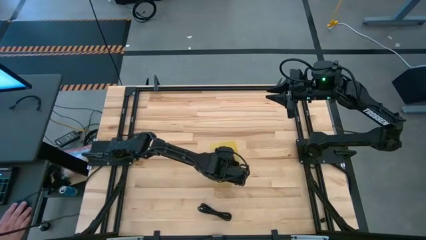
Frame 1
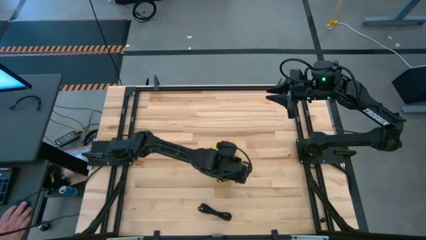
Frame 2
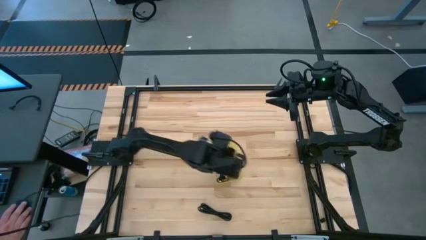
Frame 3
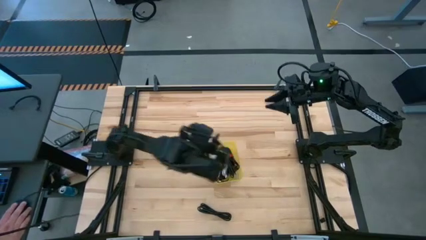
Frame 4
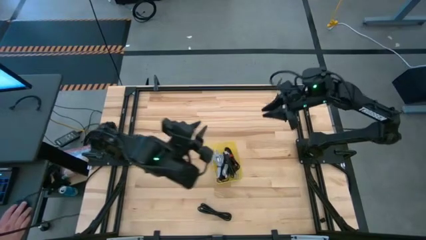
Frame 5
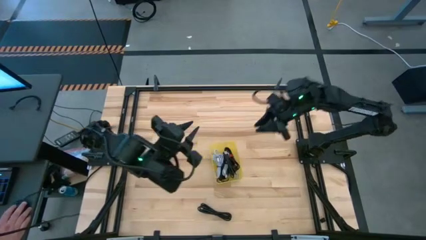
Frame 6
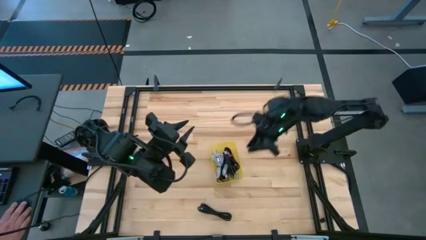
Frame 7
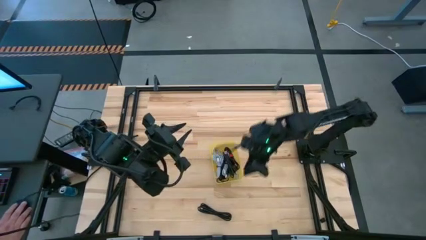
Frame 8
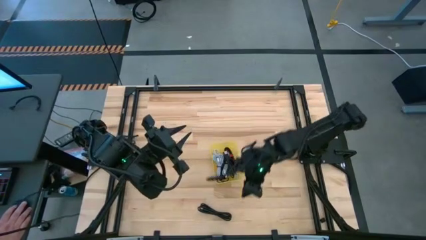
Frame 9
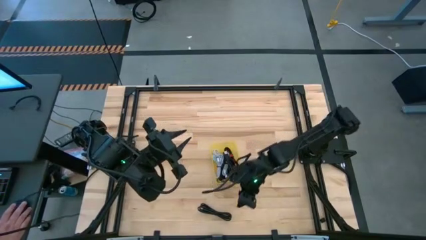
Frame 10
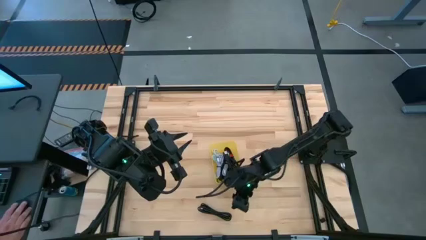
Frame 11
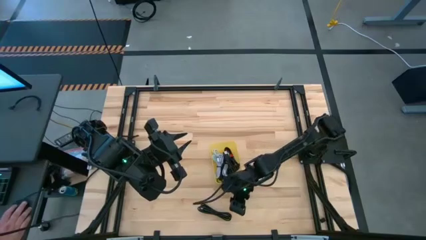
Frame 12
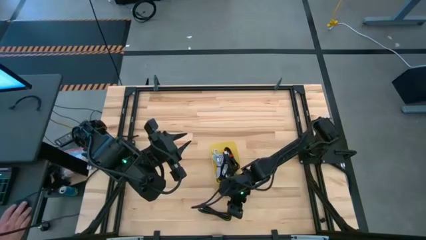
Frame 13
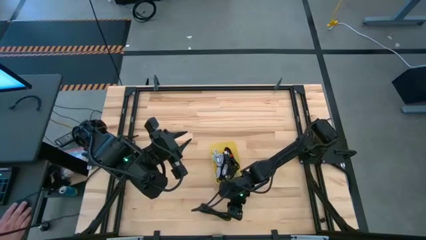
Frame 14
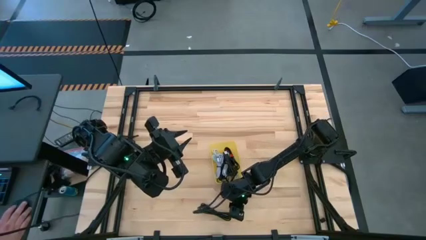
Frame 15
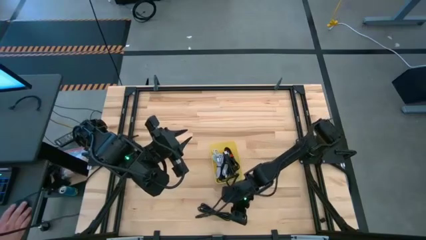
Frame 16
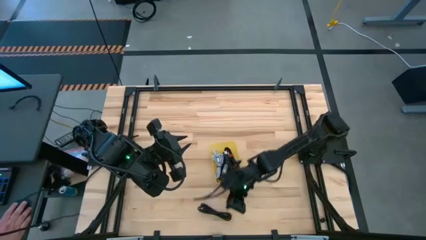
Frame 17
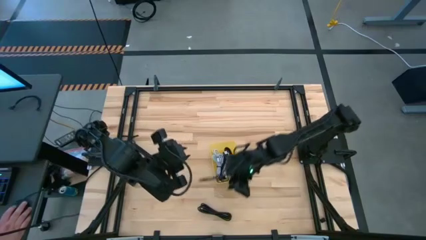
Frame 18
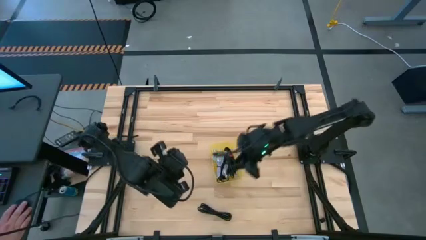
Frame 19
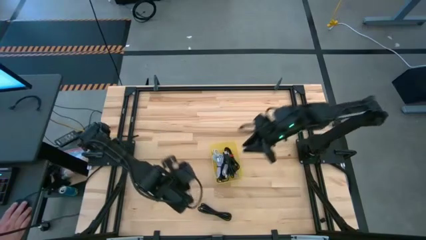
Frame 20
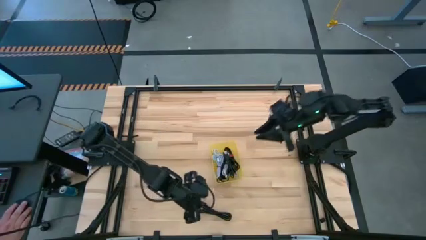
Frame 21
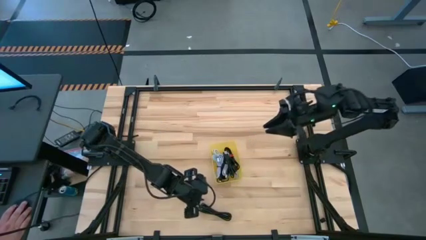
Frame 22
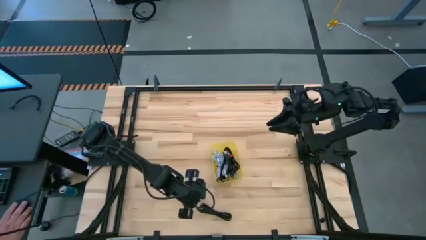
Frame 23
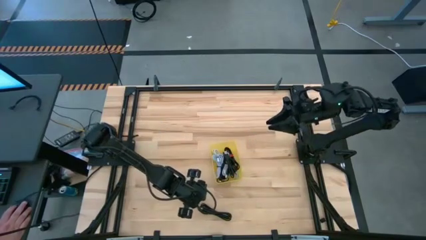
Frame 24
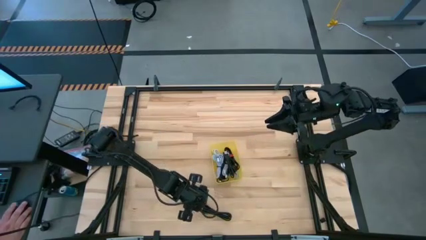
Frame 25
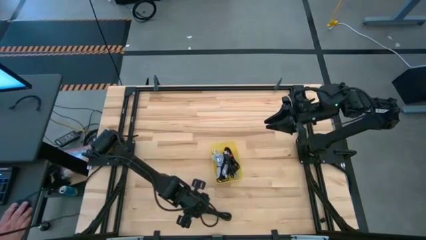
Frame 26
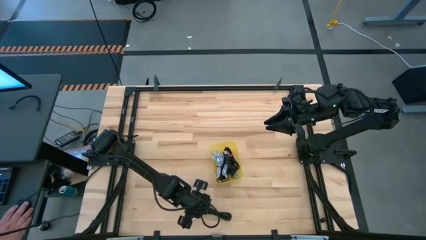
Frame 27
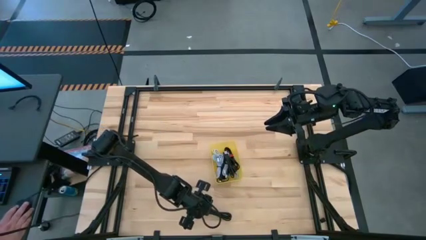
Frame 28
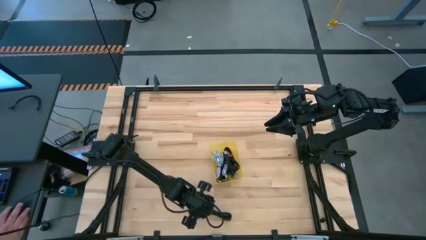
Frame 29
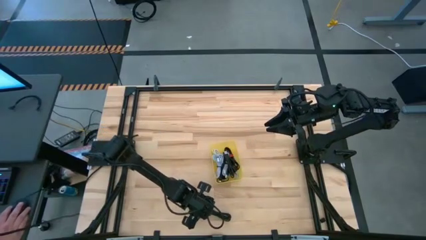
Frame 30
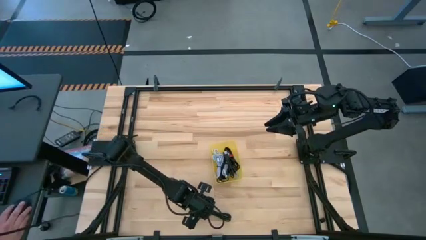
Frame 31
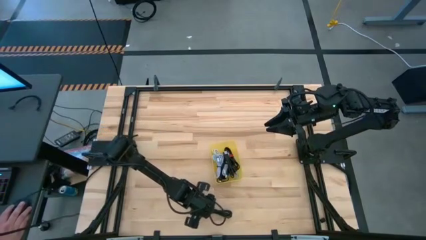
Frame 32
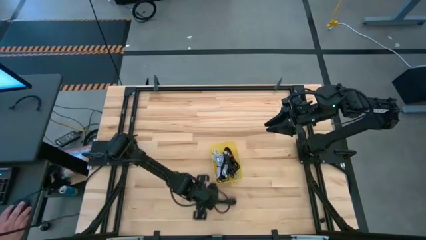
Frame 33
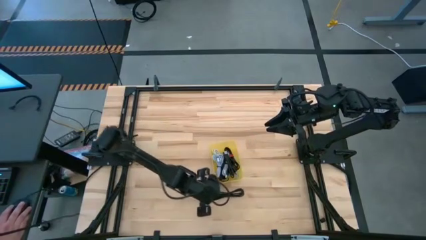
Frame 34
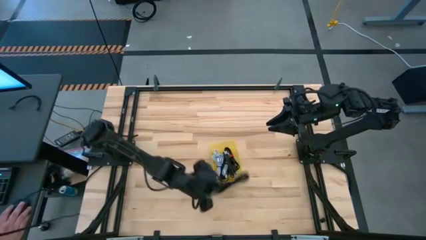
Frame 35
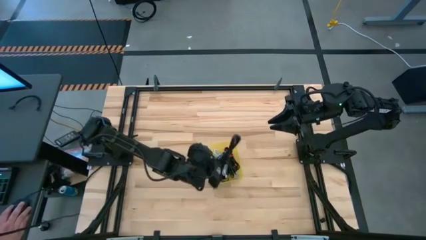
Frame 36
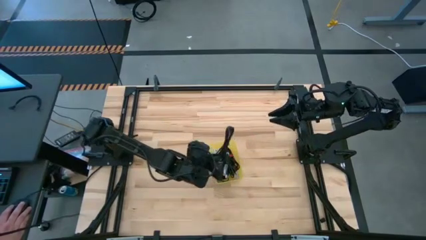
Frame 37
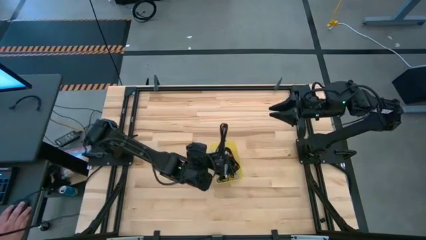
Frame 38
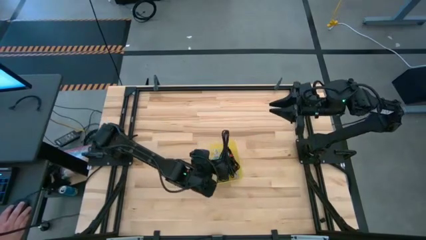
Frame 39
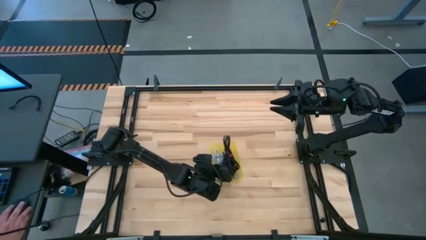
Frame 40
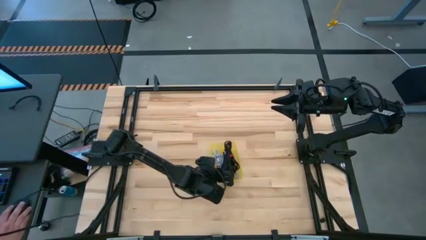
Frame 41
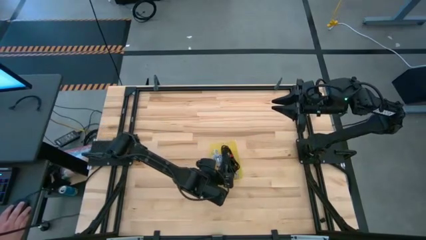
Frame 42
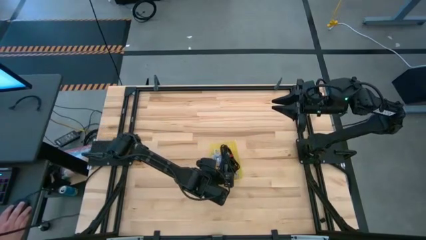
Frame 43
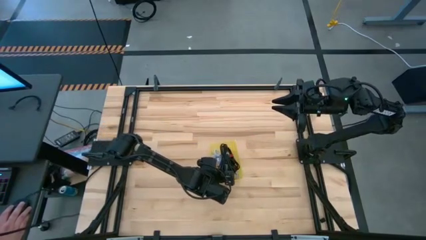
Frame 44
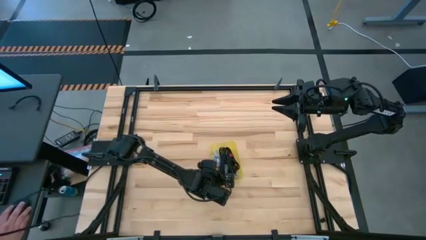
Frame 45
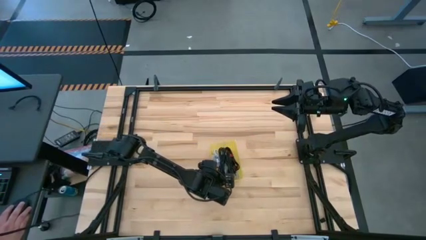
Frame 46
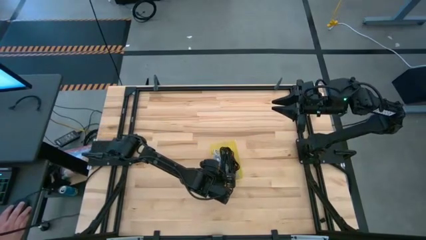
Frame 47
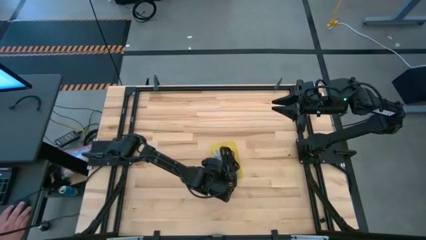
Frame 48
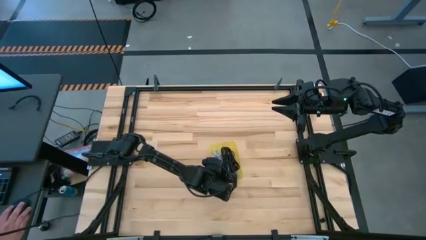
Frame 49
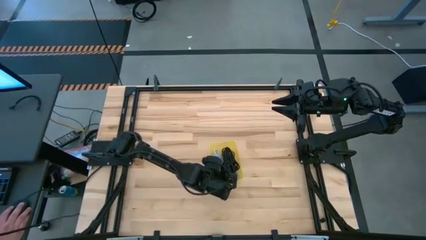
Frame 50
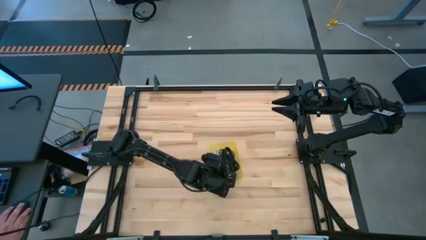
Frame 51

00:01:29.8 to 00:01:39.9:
Task: Pick and place USB-C Cables
Put the black charger cable into the yellow bin

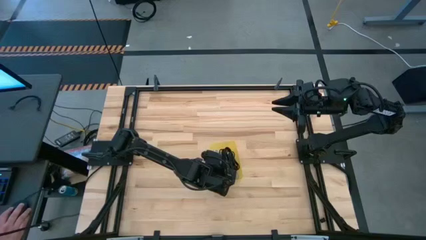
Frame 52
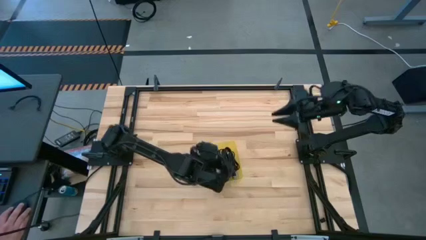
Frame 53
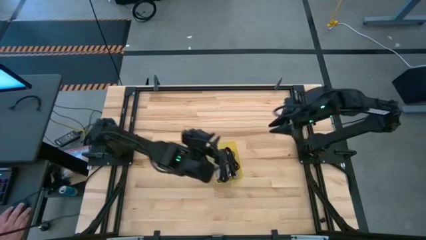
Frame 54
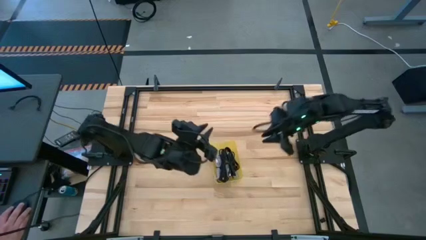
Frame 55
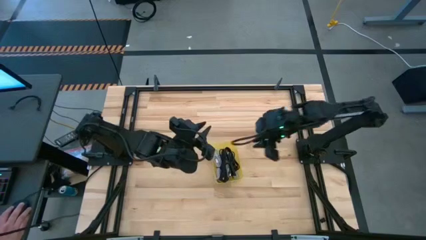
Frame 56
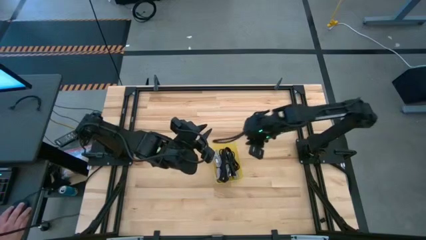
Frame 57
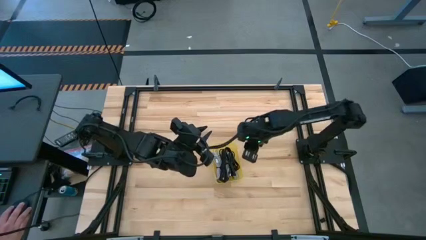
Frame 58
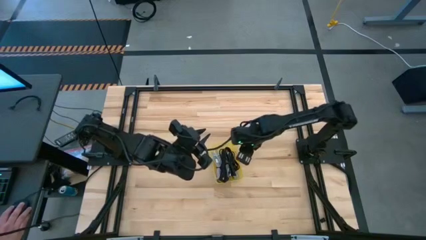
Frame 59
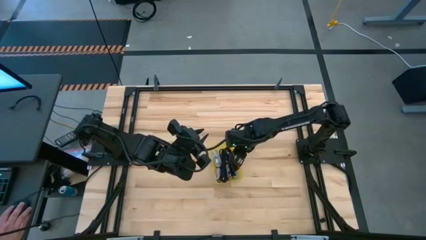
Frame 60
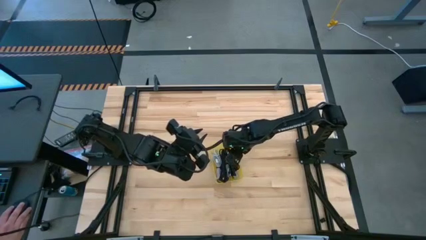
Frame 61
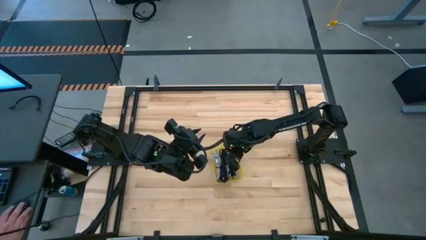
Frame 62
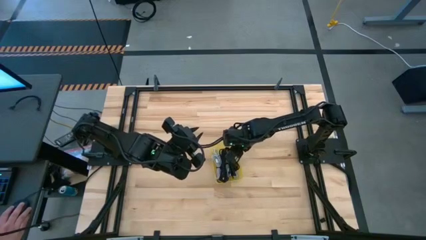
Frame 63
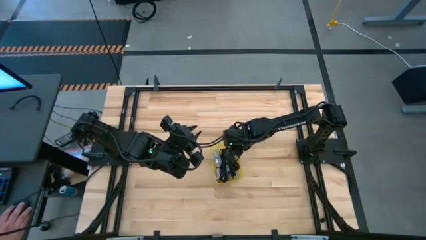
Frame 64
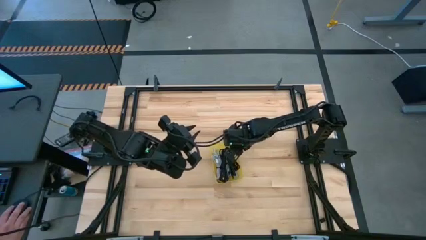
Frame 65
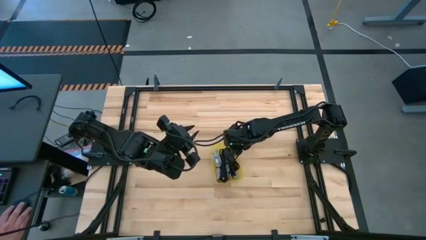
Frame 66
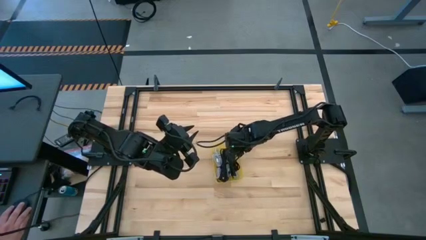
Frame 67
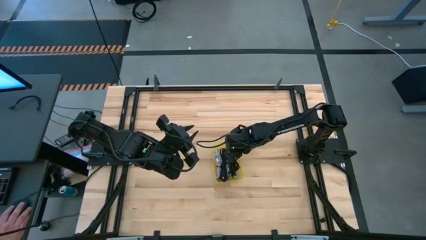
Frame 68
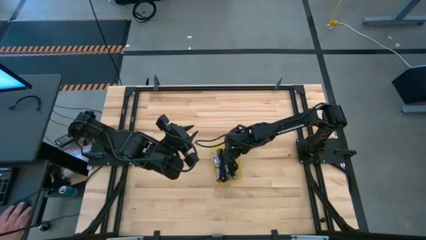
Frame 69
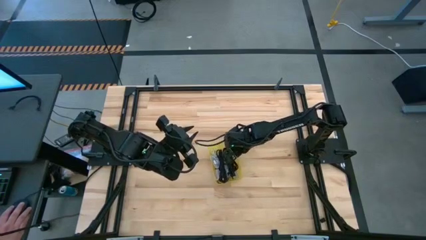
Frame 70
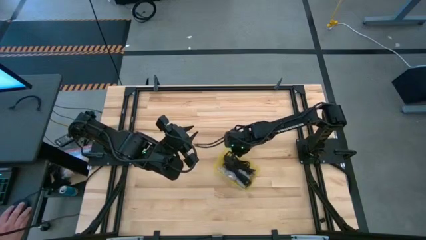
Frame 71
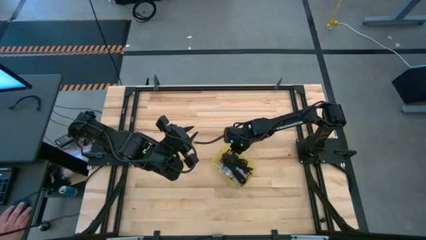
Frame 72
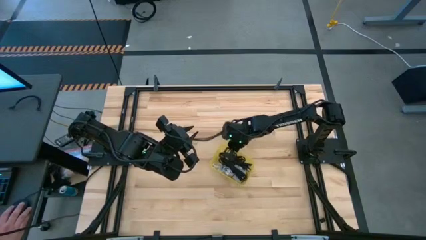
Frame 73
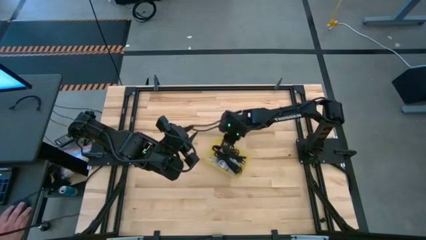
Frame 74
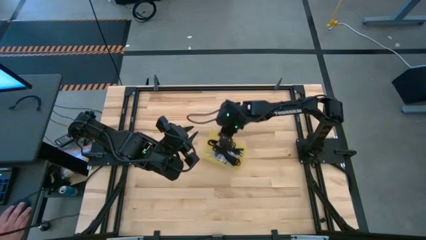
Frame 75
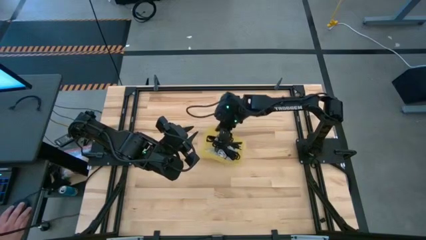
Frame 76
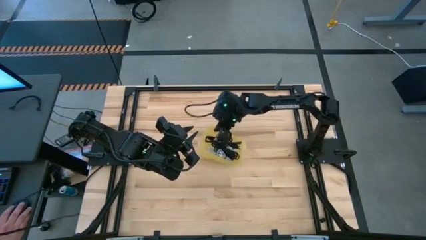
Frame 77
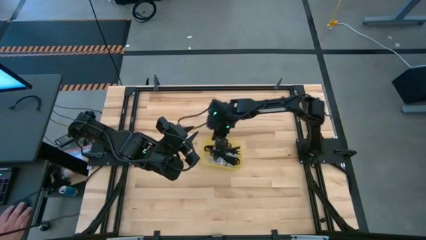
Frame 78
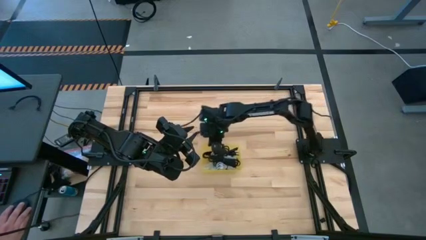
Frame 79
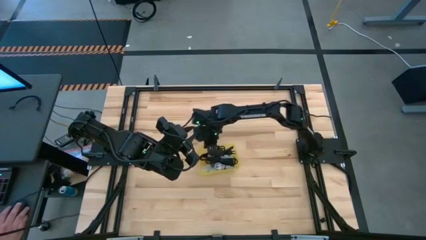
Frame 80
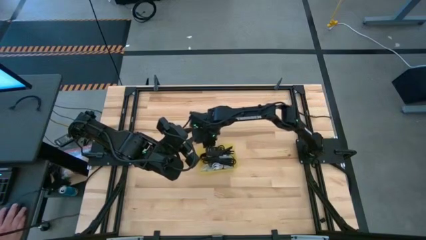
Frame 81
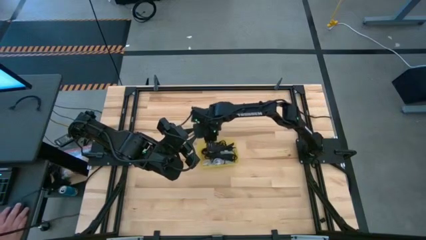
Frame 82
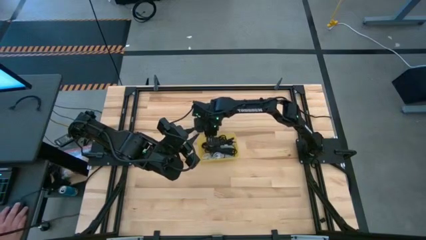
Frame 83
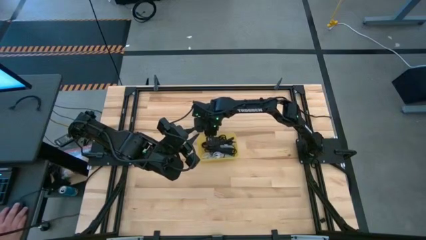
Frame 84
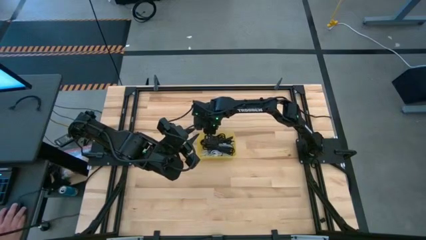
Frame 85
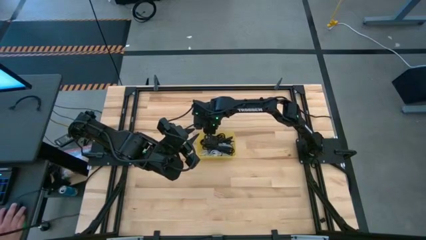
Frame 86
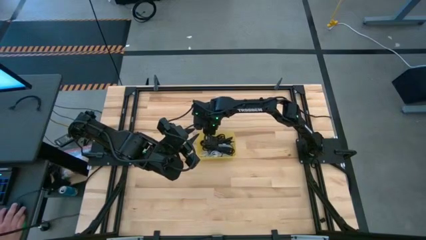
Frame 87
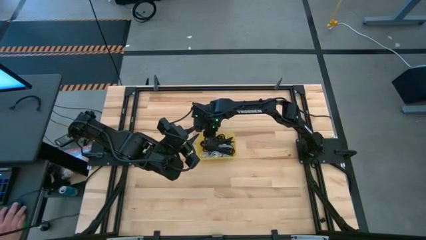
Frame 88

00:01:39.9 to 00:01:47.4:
Adjust the yellow bin
